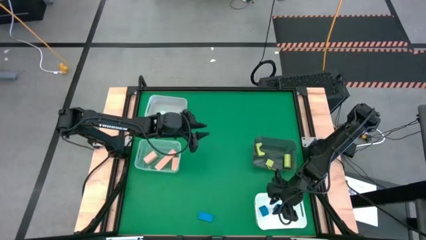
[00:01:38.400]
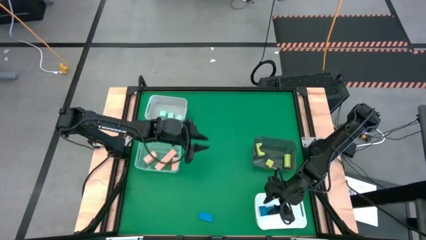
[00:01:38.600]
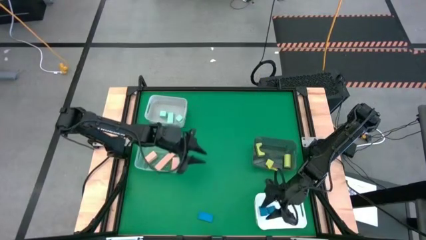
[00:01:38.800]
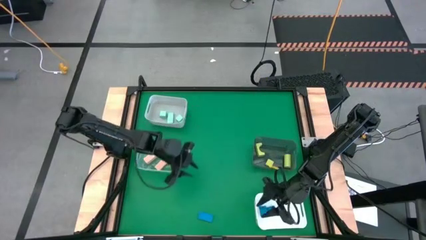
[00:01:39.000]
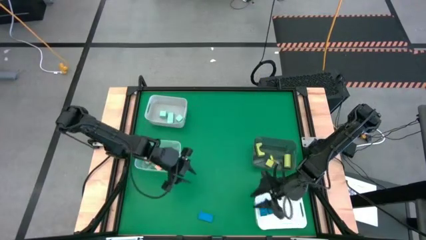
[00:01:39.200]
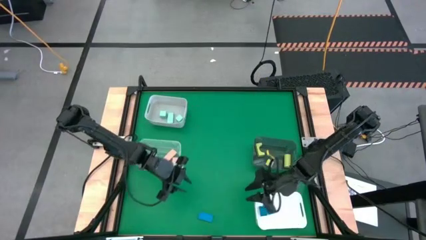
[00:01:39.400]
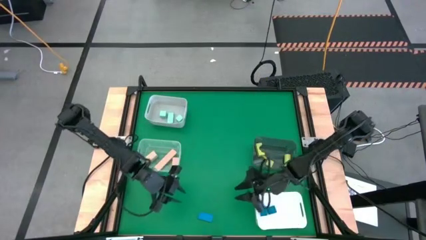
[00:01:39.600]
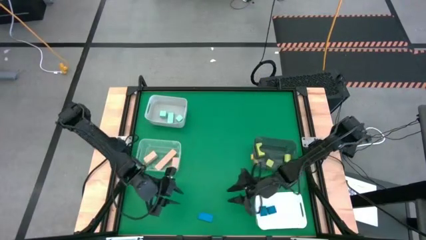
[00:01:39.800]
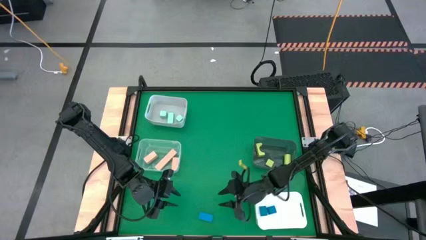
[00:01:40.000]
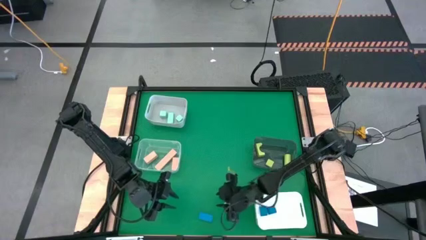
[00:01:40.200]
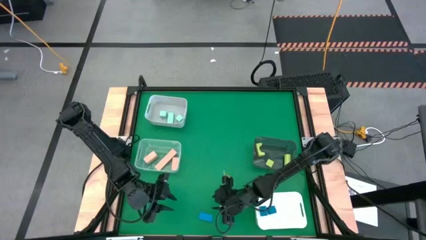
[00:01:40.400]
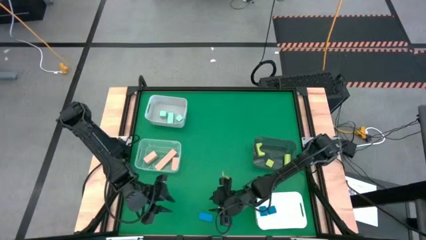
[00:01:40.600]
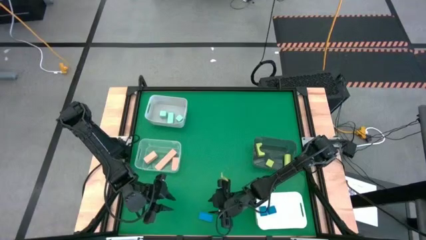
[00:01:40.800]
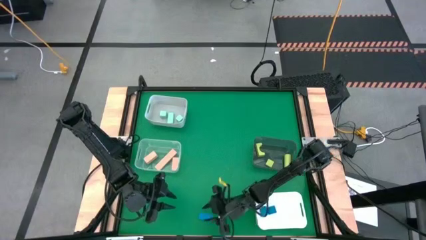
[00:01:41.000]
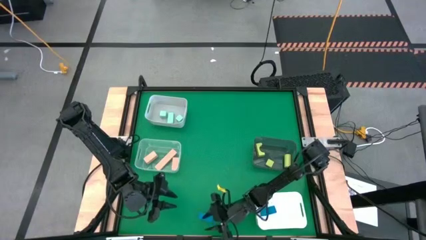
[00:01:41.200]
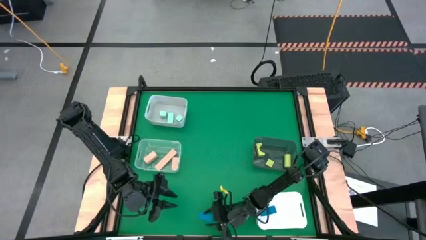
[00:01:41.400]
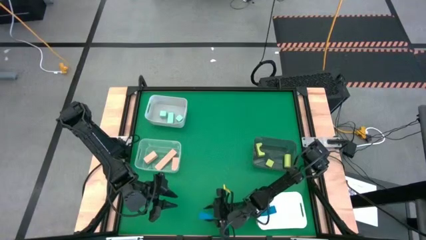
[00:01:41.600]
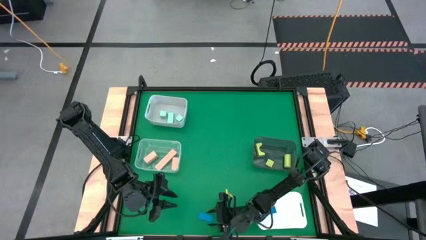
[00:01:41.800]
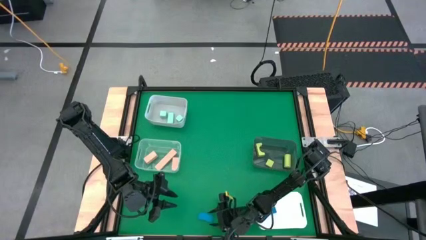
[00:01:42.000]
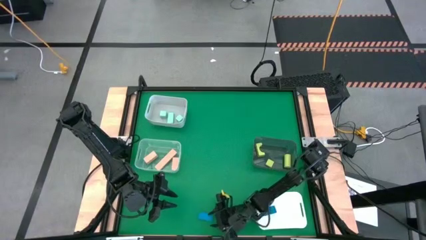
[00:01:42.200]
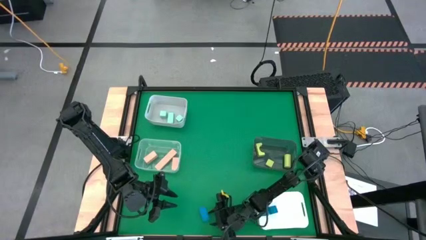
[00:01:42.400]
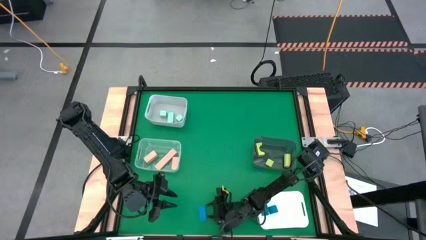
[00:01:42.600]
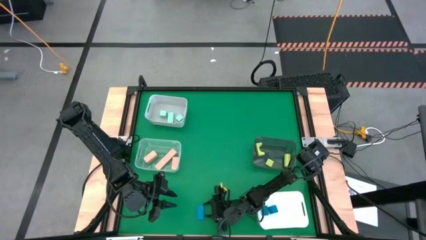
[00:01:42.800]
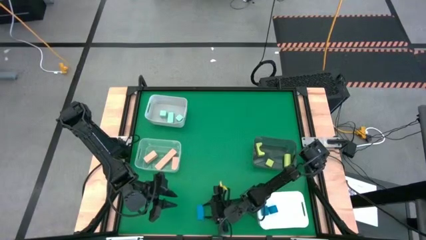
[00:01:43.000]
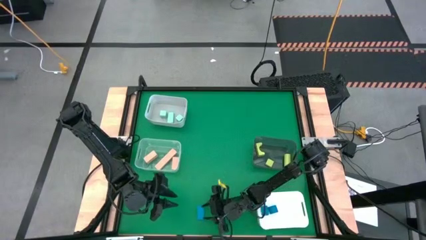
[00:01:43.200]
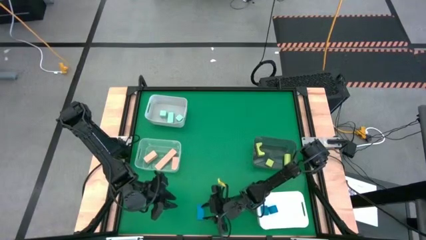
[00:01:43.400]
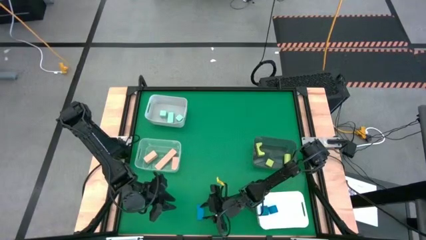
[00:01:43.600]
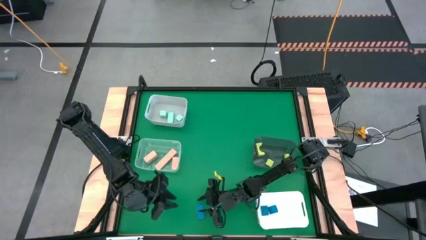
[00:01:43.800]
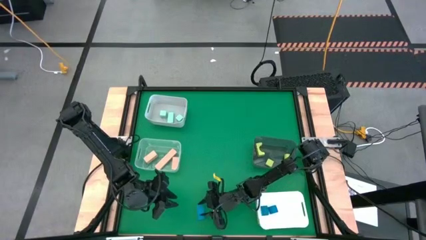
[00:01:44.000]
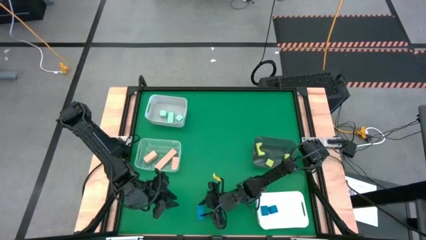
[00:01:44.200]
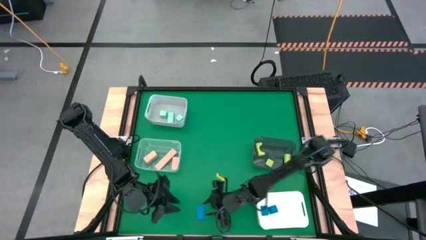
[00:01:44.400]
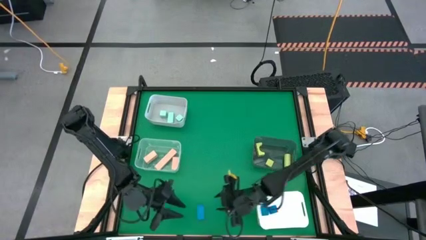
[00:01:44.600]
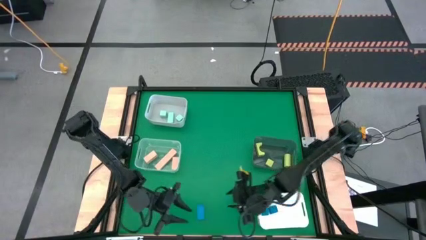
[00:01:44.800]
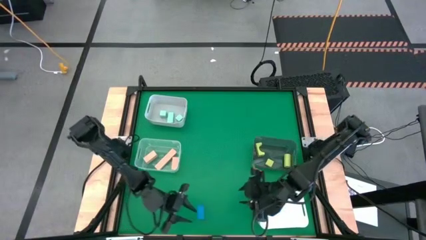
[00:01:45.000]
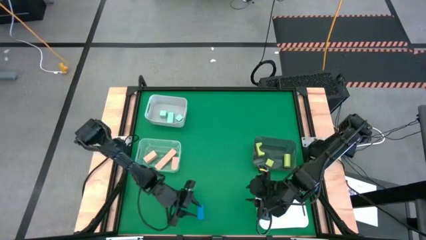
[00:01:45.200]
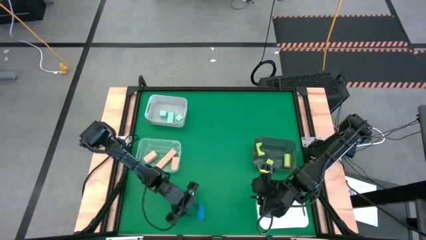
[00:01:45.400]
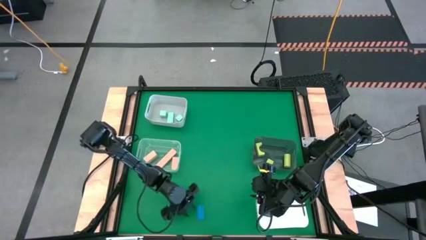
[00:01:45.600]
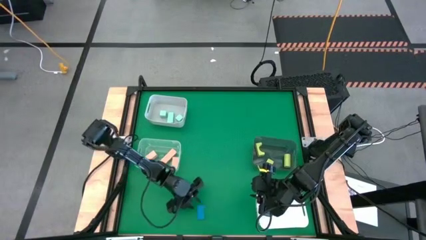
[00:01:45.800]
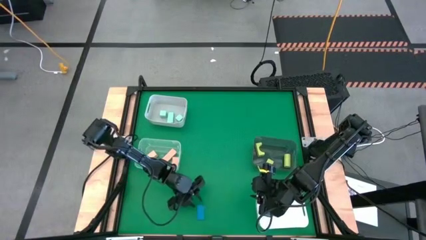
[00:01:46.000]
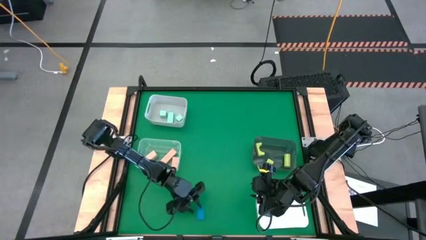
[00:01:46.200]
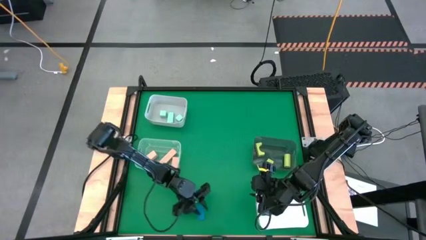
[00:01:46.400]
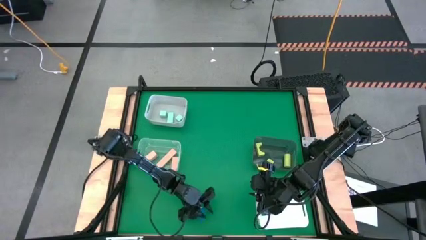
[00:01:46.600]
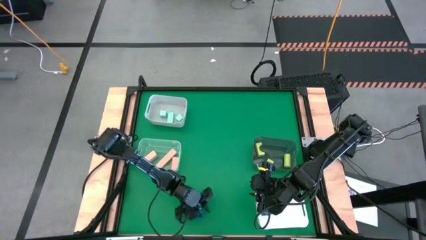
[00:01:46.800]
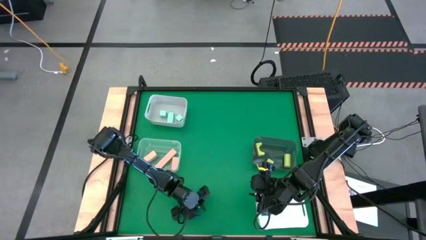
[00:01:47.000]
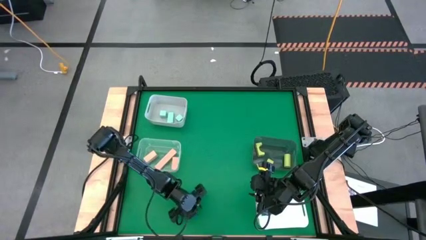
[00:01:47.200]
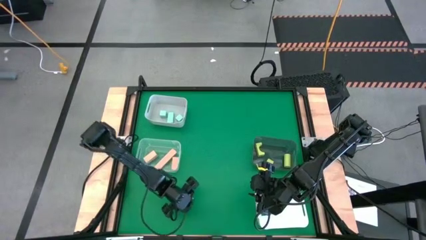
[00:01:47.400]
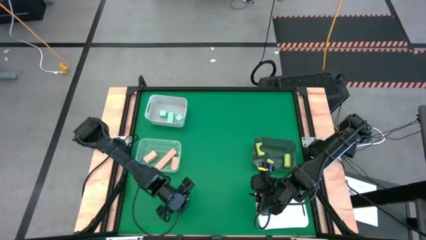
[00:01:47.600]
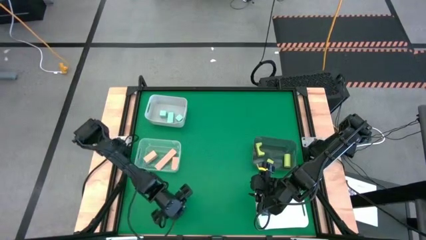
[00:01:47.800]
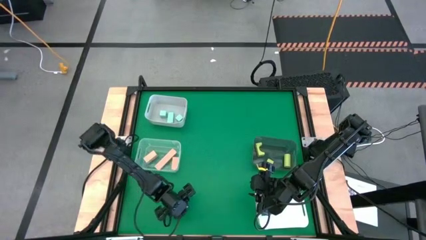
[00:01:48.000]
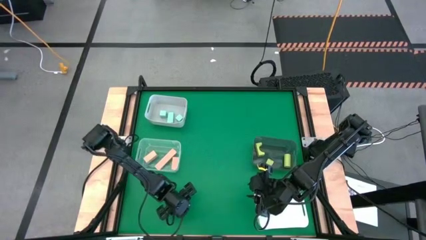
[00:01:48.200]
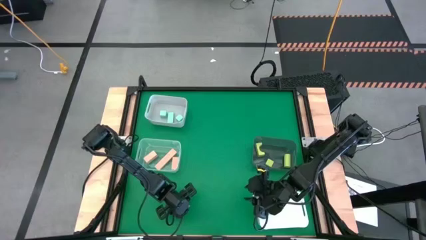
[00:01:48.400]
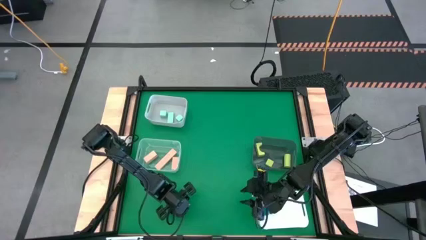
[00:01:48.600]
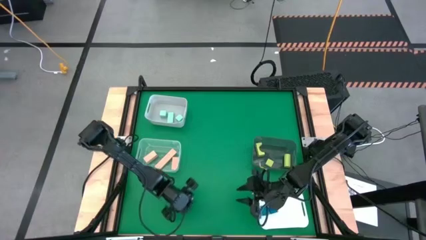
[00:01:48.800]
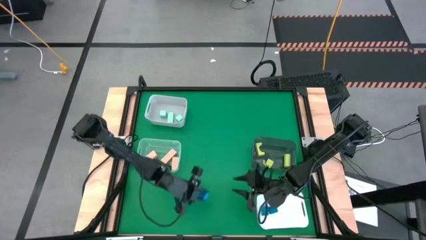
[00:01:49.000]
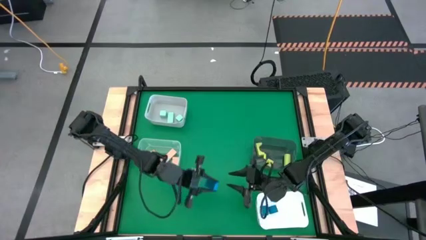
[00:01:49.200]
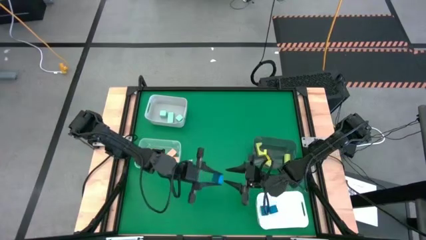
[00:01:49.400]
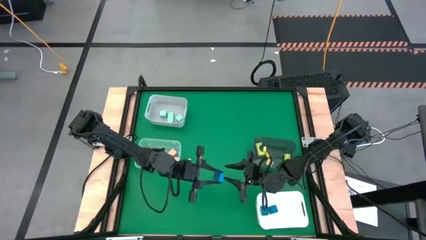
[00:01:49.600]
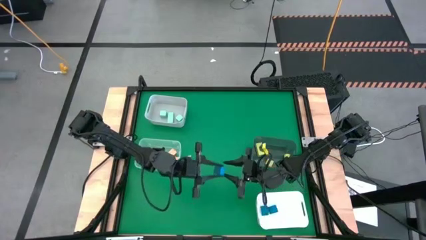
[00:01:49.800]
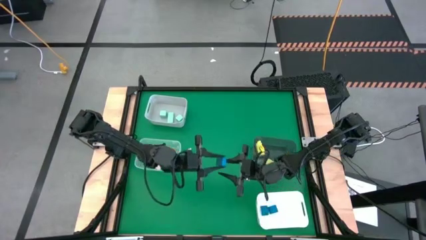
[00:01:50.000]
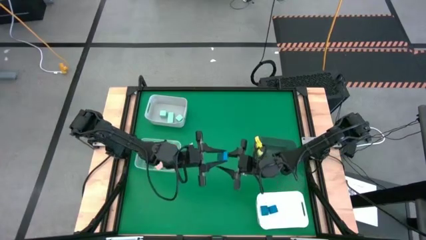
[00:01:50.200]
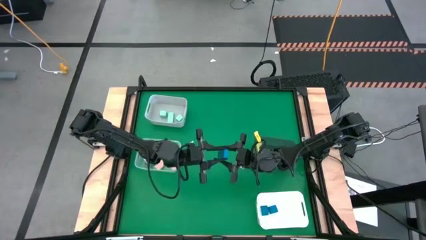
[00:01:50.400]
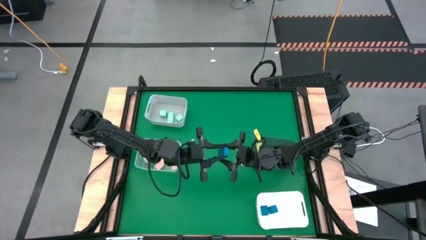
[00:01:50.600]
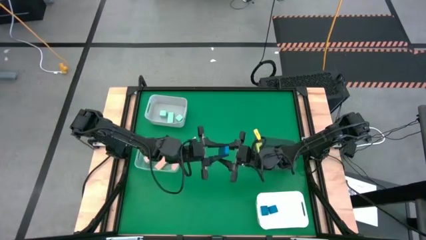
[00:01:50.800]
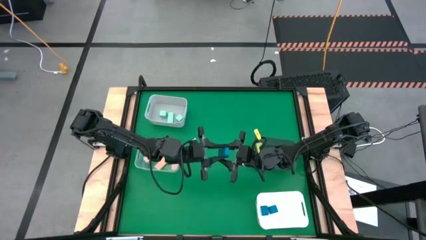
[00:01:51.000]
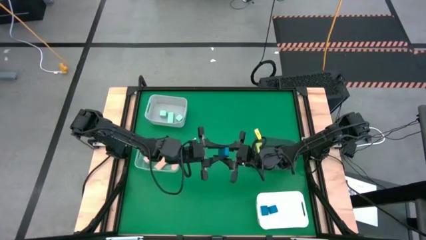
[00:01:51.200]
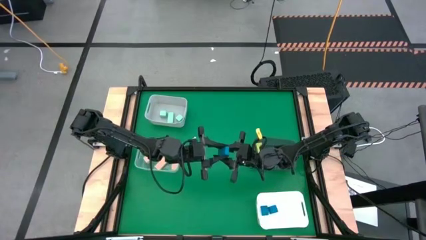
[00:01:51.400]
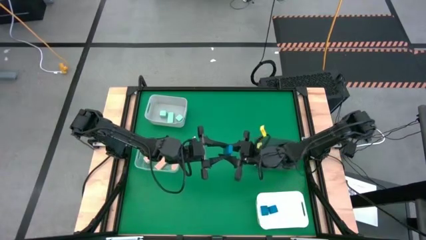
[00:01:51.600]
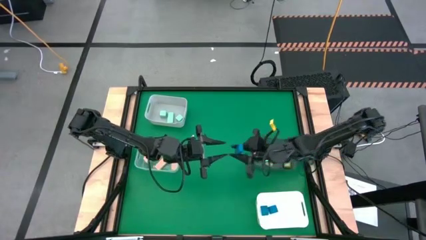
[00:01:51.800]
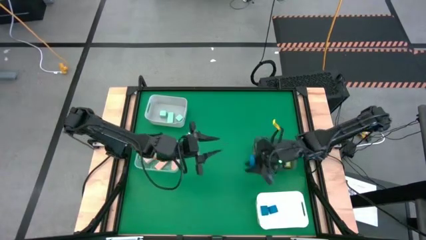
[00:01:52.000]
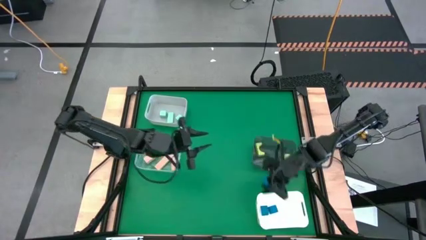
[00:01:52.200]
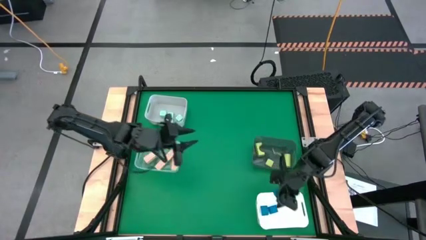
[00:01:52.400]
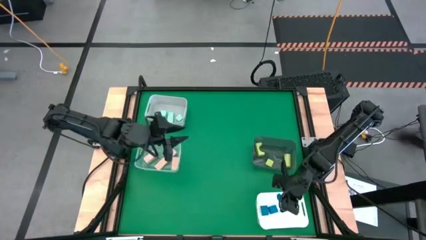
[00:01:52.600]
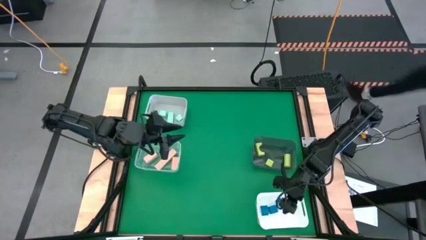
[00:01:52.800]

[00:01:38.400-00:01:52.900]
Task: Sort & place blocks by color
Put the blue block into the white bin

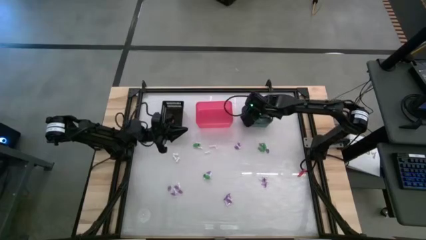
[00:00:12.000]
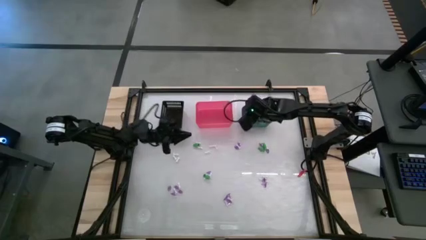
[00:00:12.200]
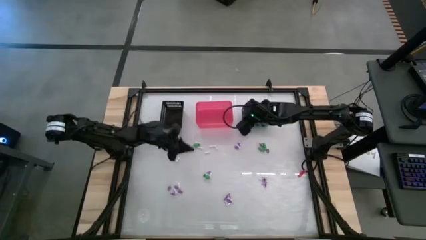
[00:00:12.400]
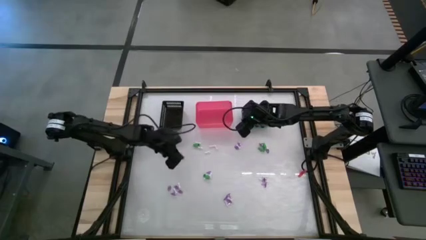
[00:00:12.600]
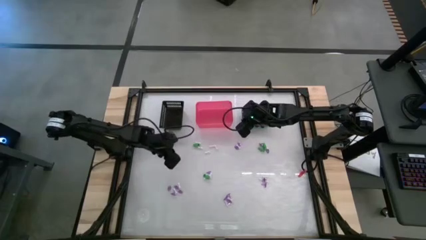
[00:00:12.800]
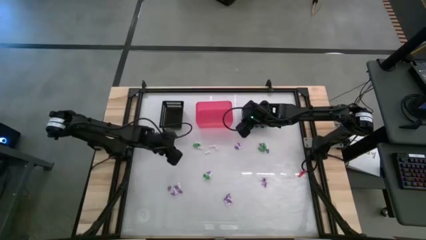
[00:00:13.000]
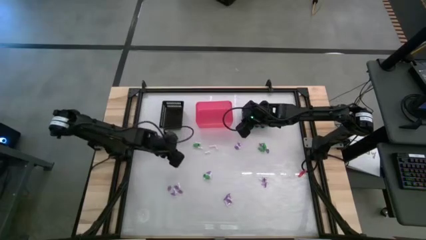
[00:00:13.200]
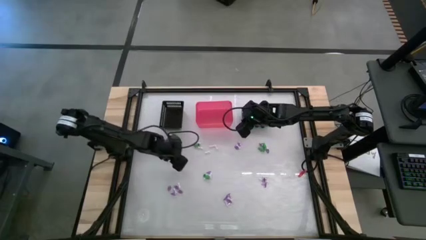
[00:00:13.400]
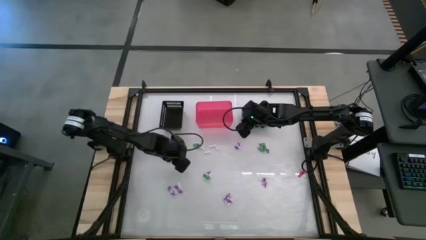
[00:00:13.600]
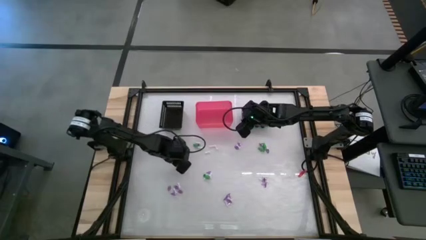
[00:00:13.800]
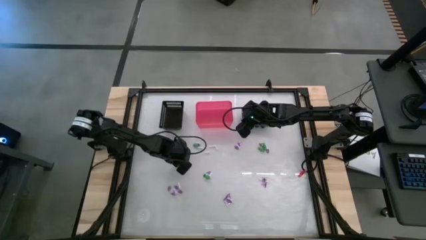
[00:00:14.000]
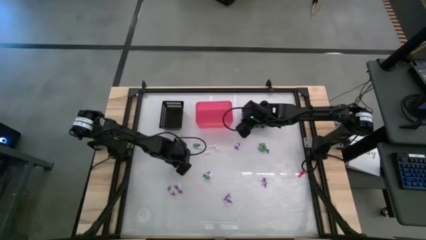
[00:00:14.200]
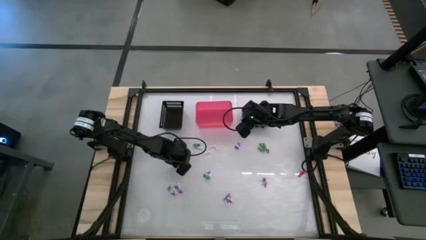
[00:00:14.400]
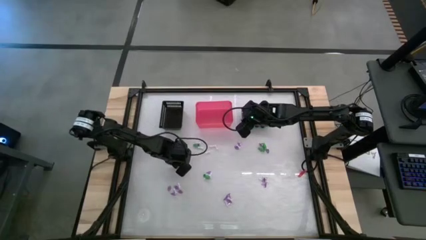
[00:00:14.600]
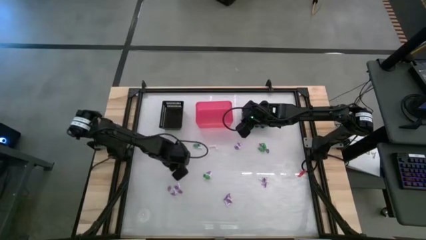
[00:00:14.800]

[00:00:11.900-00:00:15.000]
Task: Sort Halloween decoration
Put the white bone toy into the black bin
